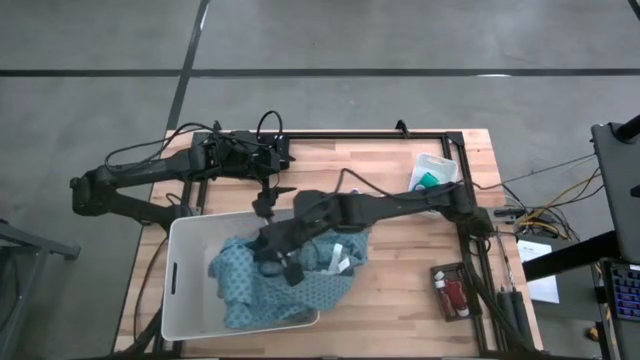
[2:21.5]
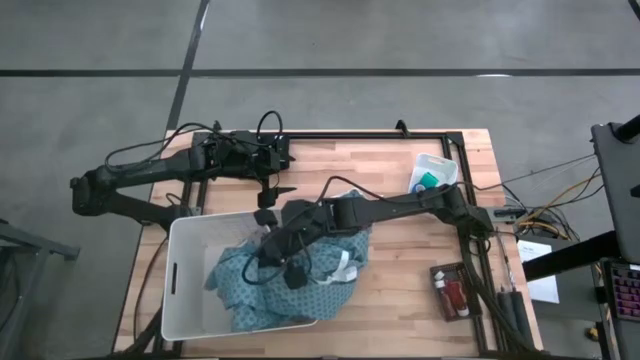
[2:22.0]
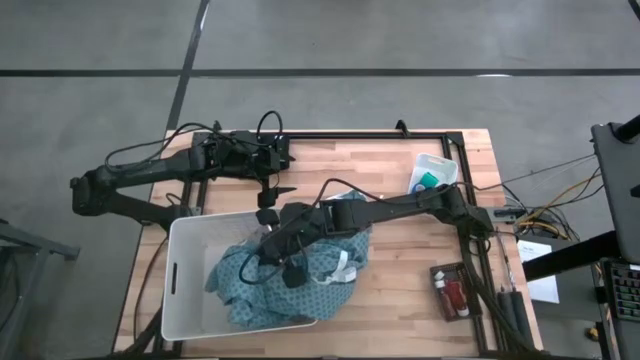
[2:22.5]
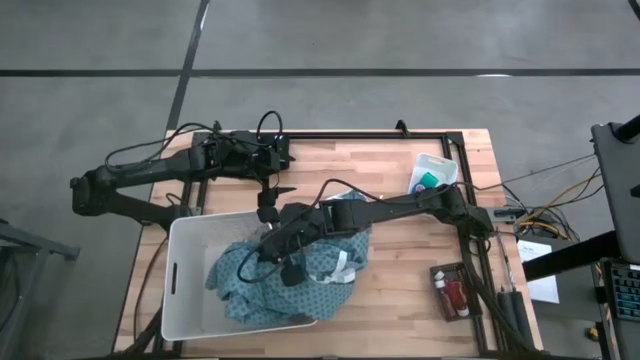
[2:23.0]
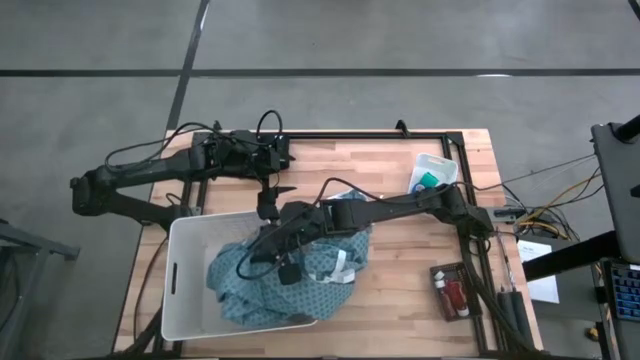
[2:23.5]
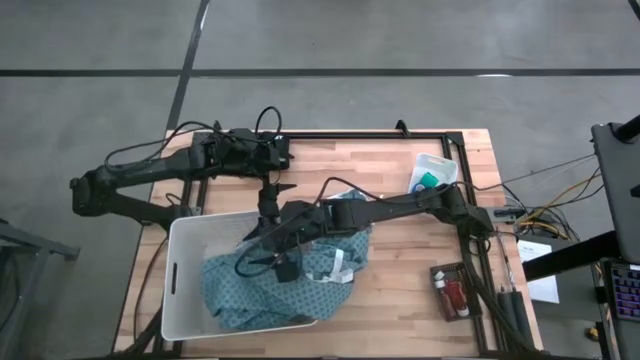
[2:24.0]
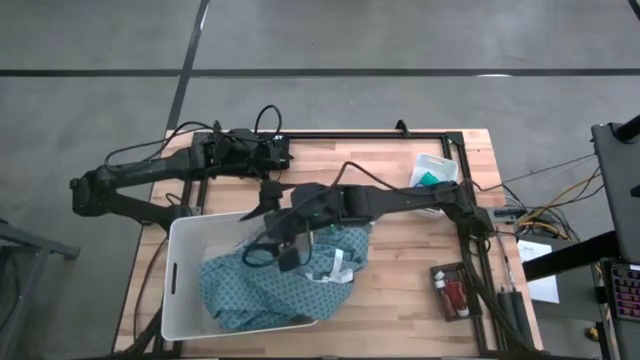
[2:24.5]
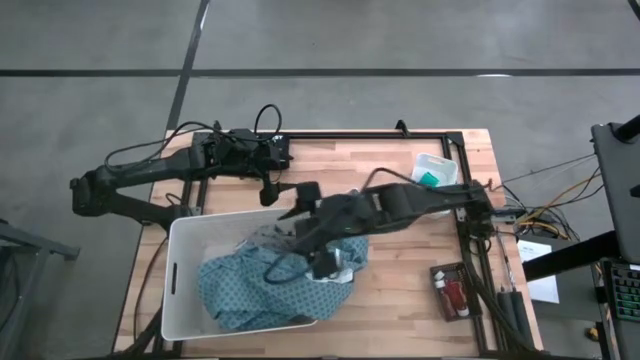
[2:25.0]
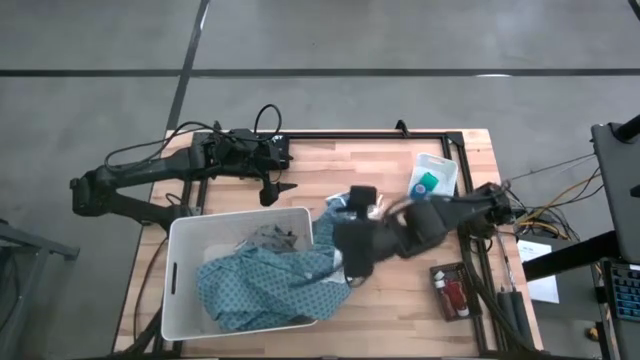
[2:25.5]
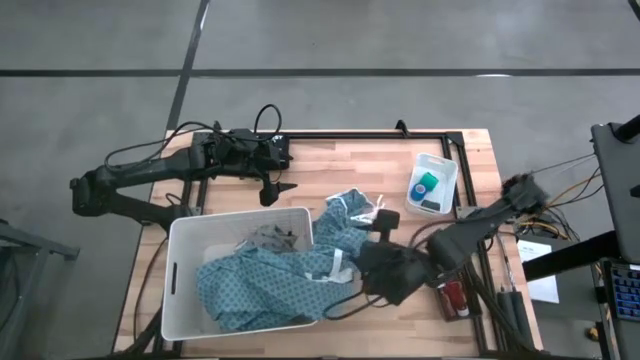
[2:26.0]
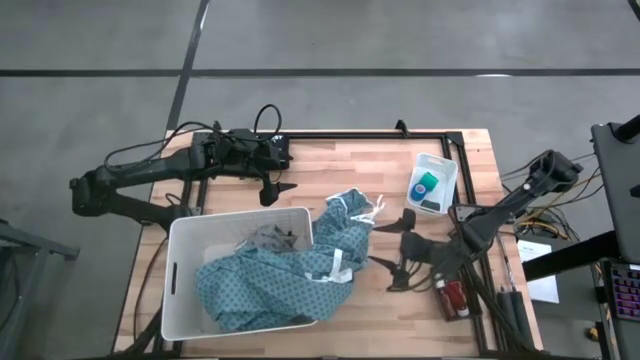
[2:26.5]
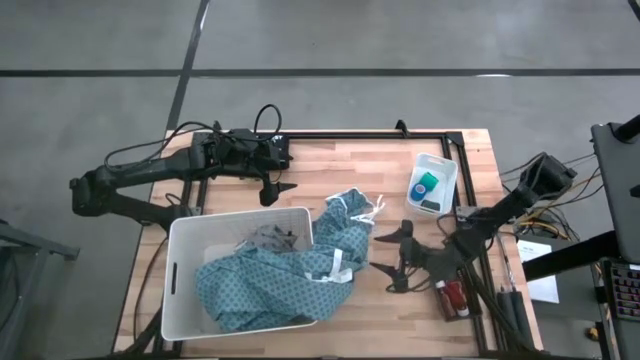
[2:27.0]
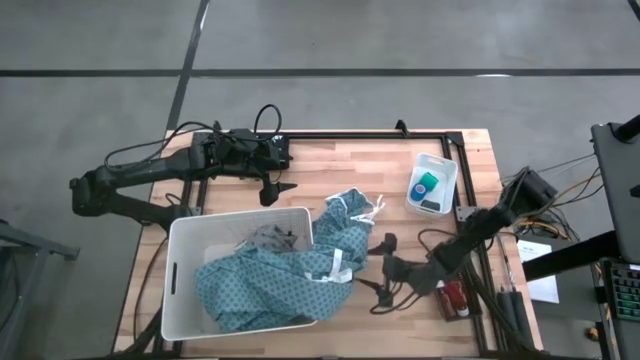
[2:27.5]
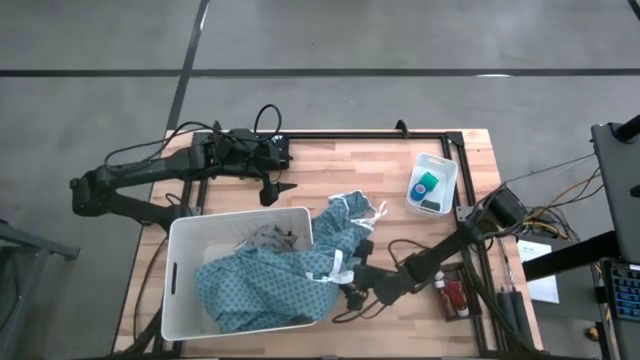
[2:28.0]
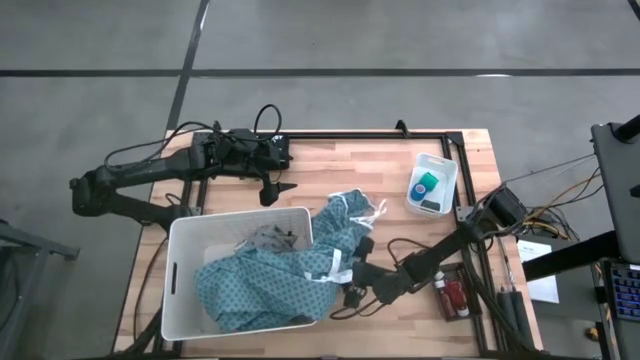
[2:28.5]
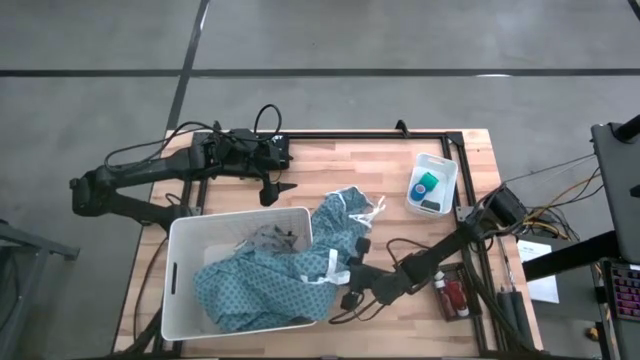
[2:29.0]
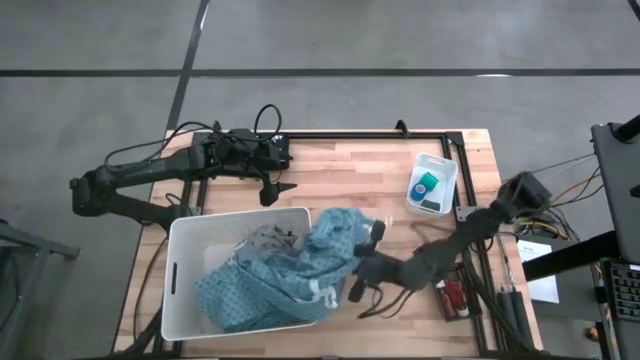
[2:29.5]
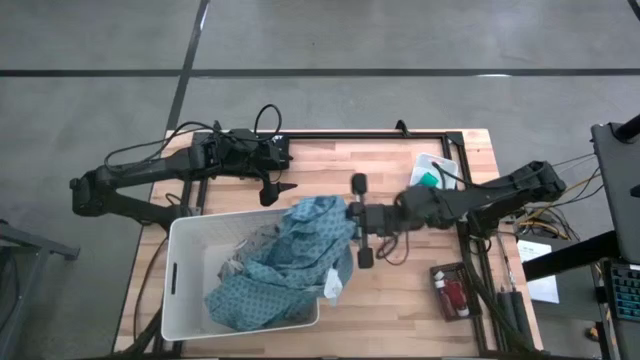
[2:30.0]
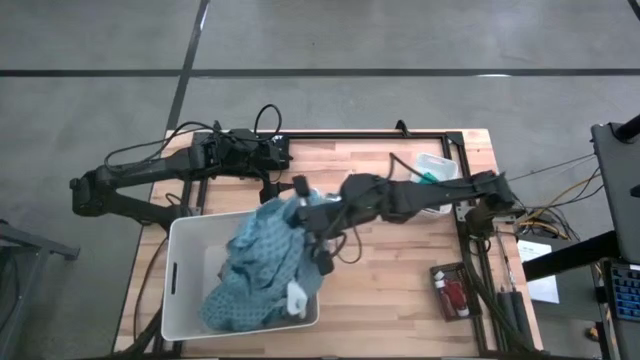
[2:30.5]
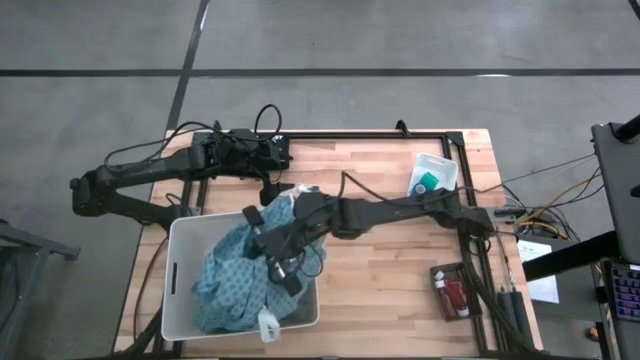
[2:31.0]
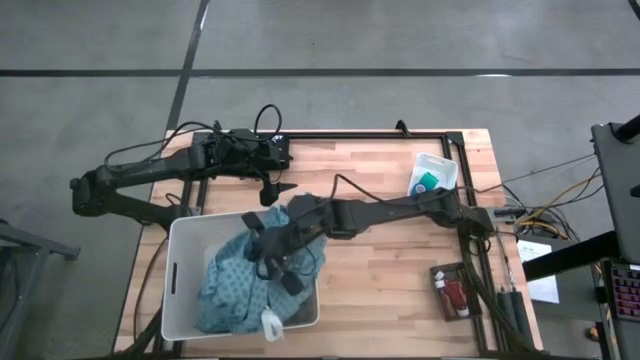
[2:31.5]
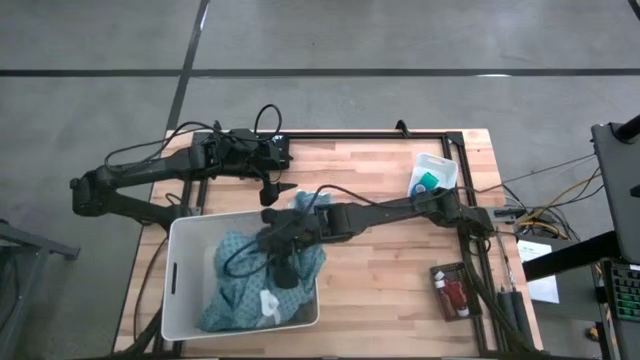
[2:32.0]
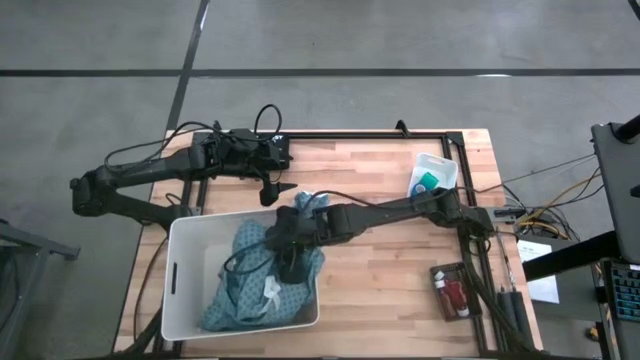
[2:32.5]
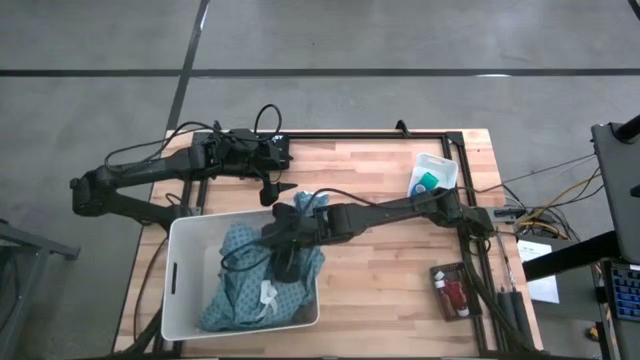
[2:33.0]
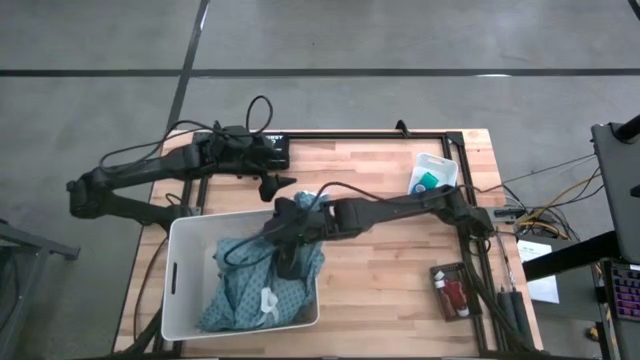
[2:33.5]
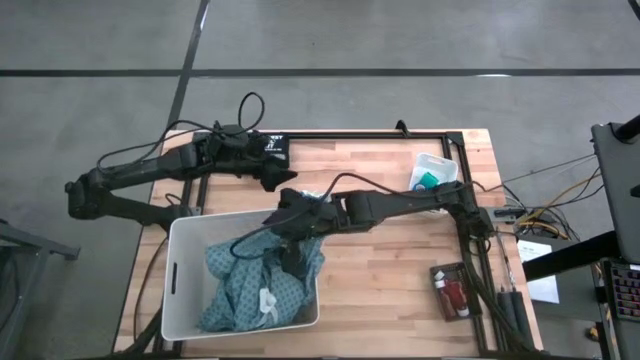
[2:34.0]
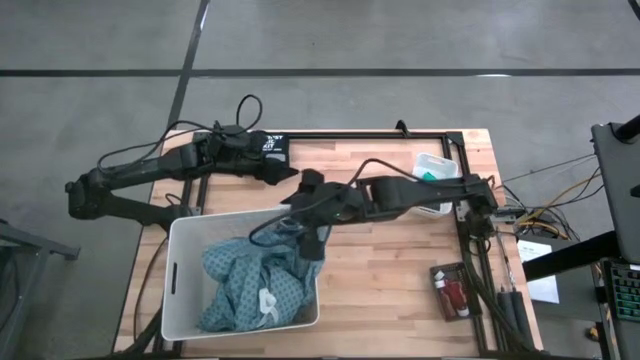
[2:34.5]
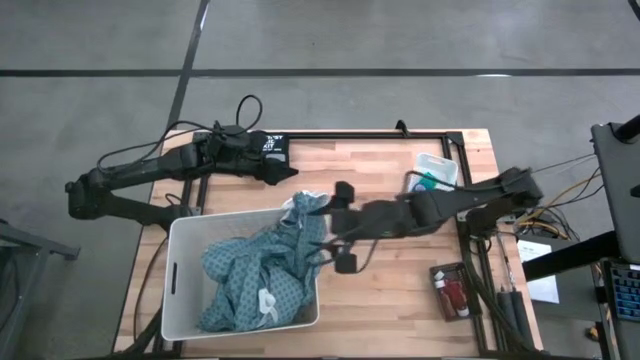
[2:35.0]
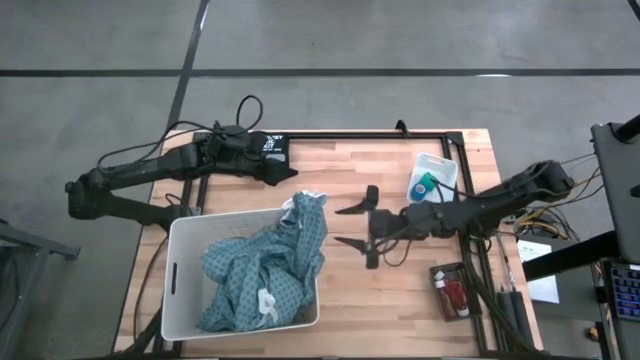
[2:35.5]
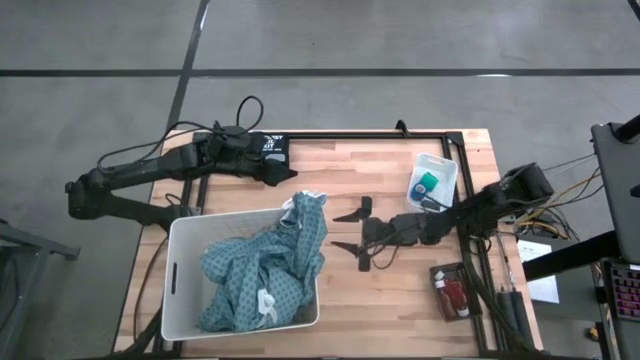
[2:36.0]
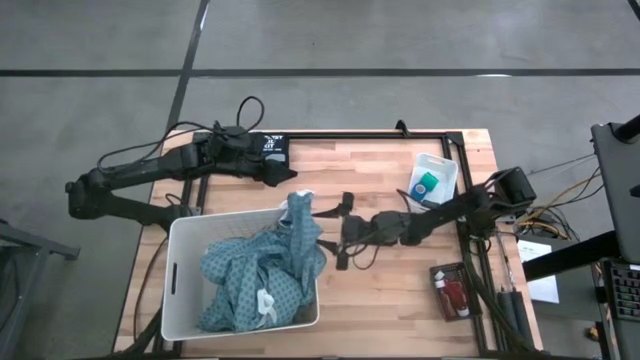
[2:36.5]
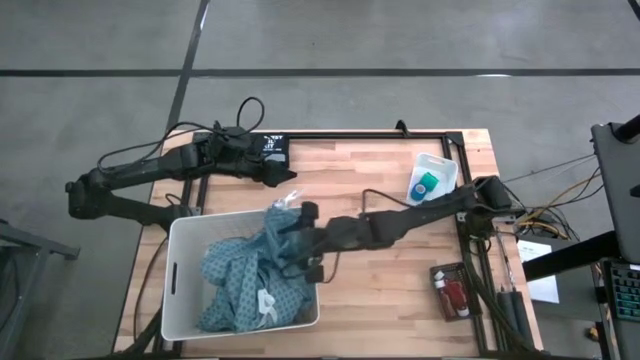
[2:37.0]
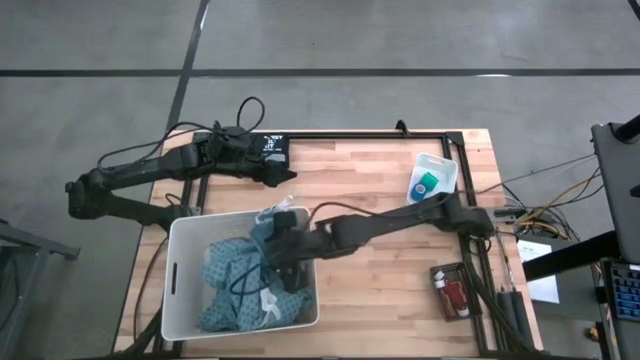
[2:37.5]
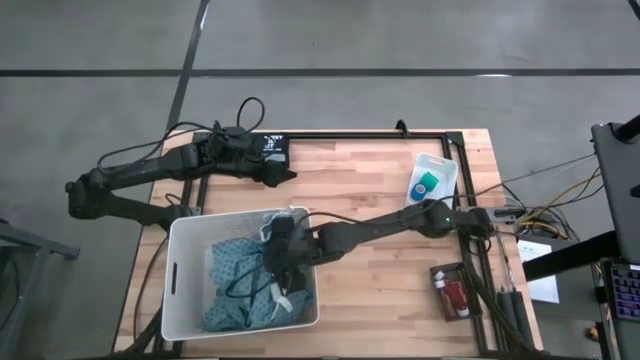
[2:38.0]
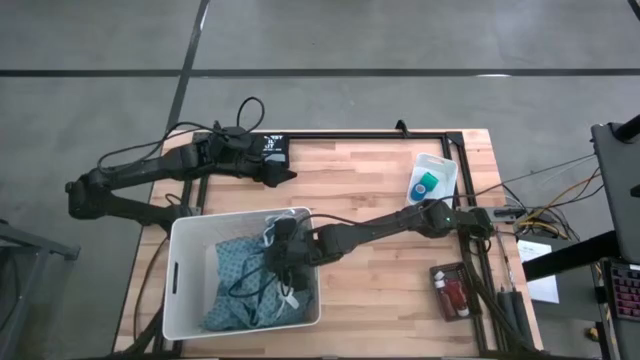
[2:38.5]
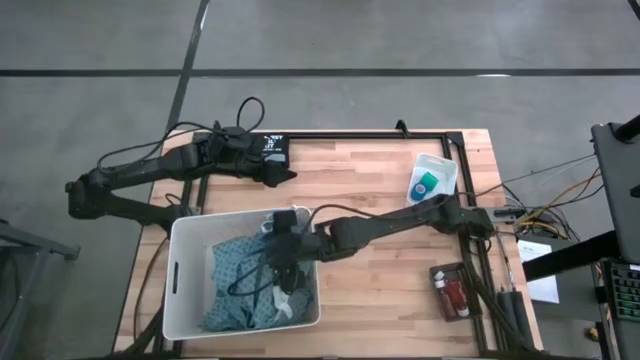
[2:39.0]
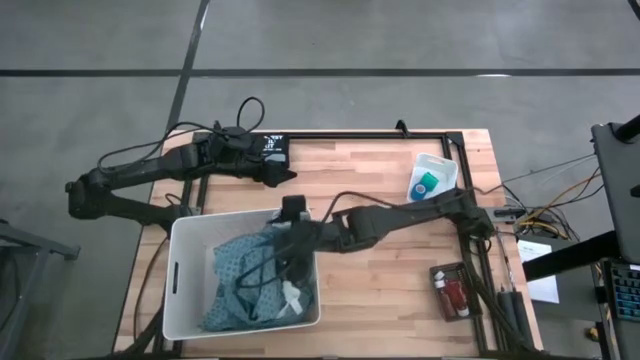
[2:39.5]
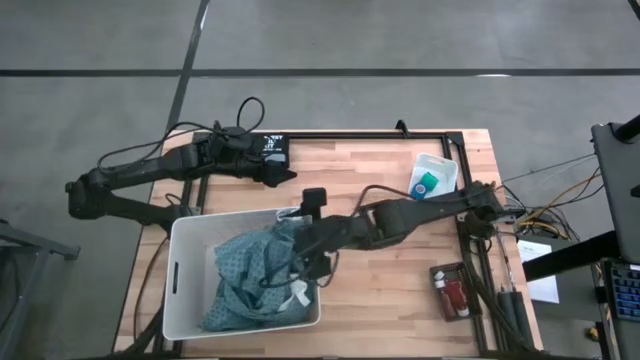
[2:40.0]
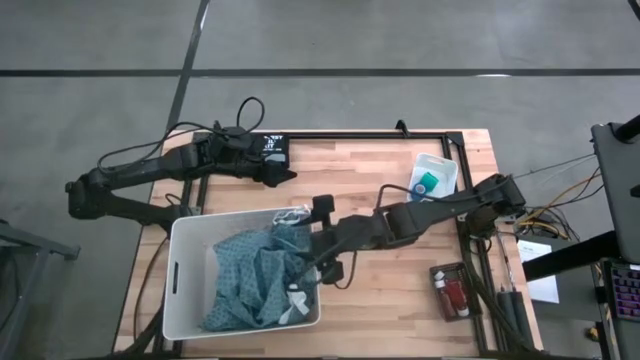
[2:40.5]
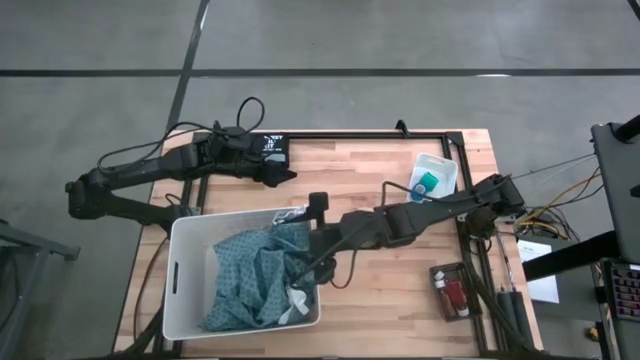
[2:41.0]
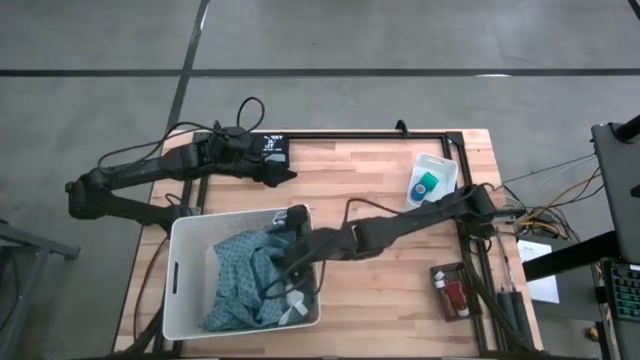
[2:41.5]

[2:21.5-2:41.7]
Task: Pick & Place Medicine items
Put the blue patient gown into the big white bin
